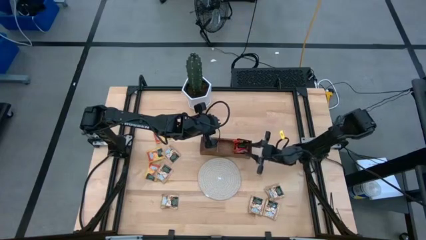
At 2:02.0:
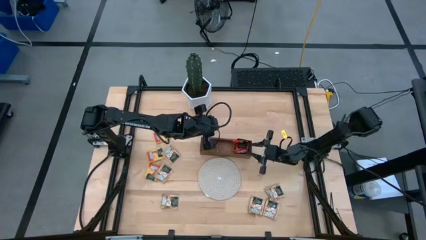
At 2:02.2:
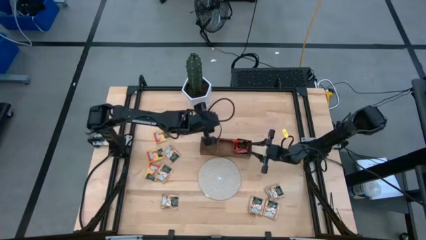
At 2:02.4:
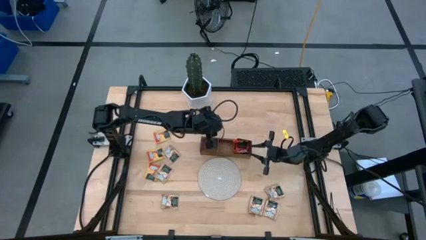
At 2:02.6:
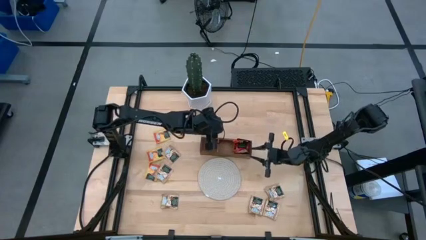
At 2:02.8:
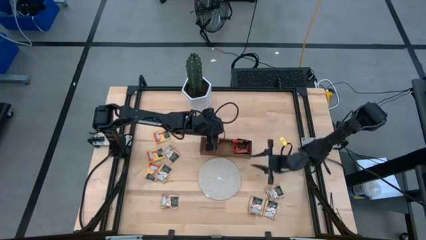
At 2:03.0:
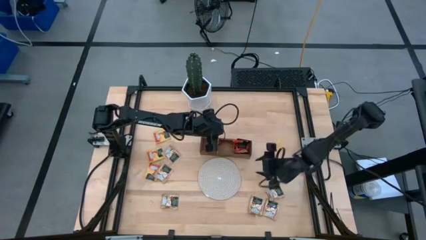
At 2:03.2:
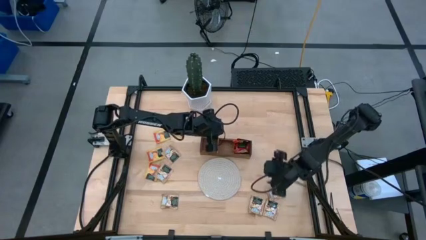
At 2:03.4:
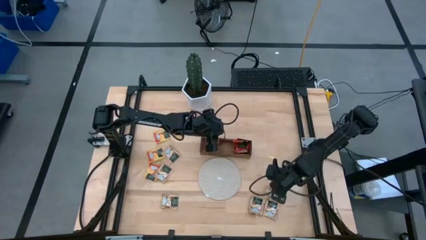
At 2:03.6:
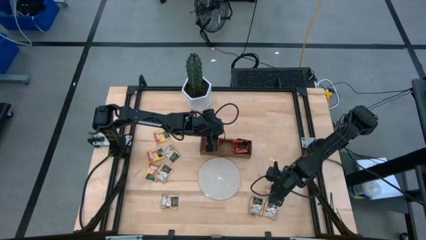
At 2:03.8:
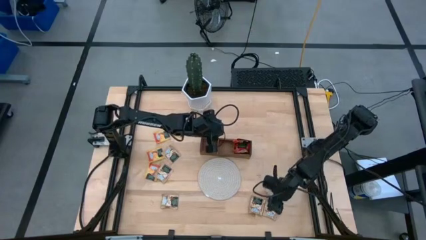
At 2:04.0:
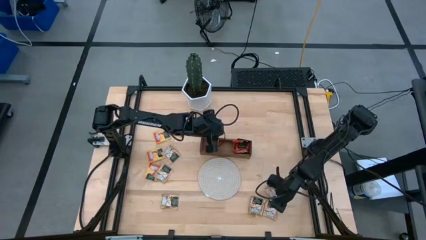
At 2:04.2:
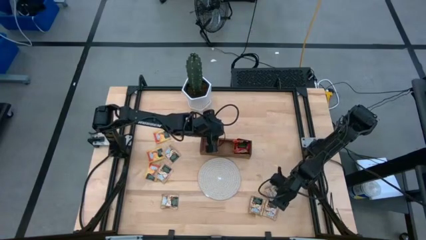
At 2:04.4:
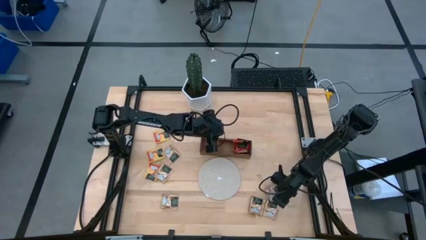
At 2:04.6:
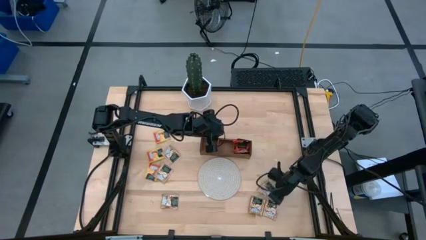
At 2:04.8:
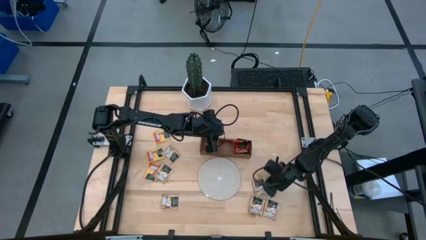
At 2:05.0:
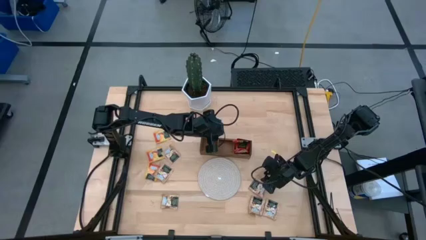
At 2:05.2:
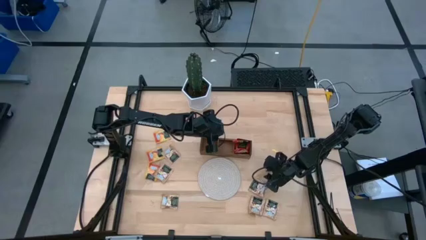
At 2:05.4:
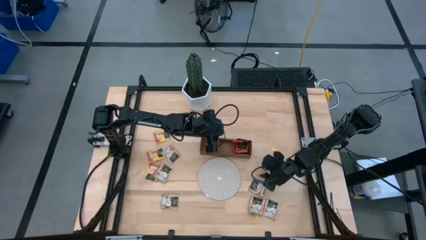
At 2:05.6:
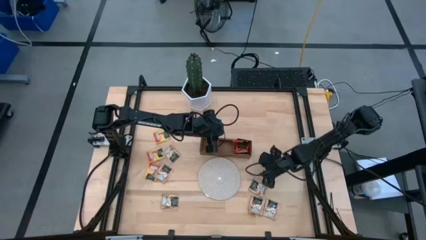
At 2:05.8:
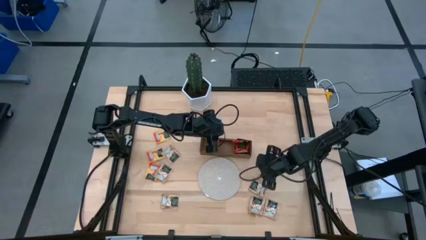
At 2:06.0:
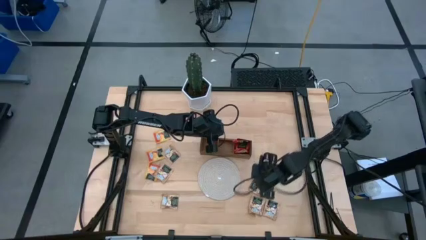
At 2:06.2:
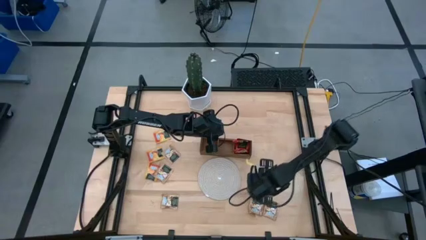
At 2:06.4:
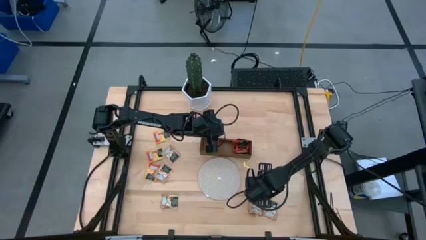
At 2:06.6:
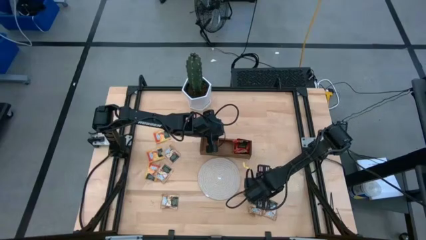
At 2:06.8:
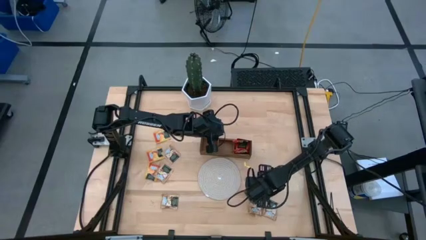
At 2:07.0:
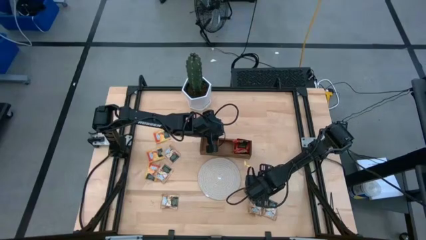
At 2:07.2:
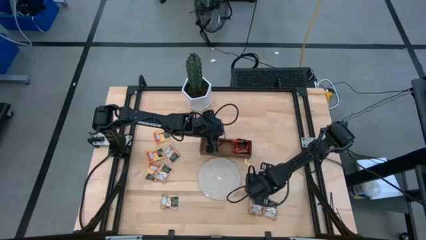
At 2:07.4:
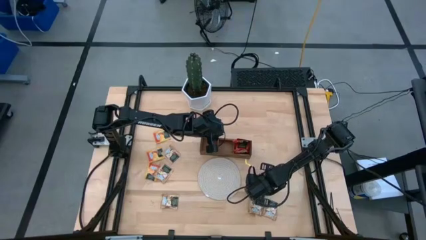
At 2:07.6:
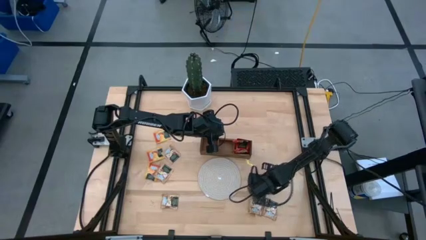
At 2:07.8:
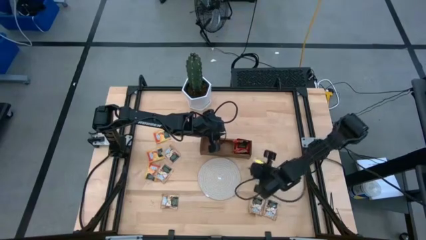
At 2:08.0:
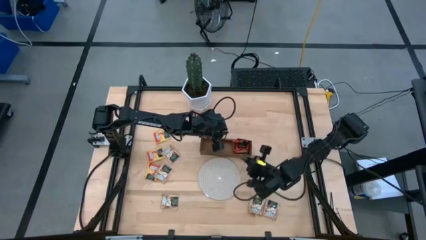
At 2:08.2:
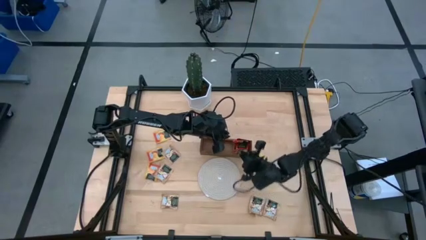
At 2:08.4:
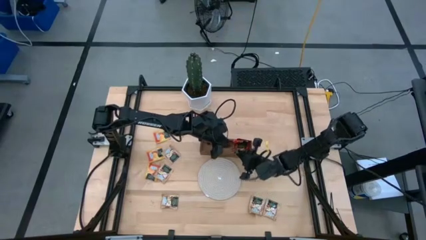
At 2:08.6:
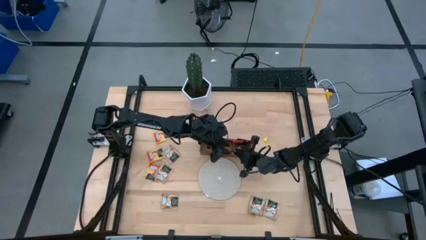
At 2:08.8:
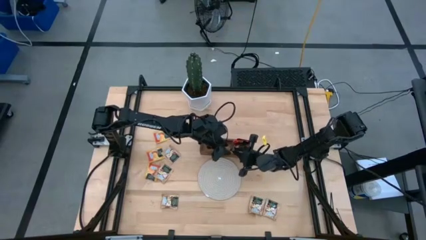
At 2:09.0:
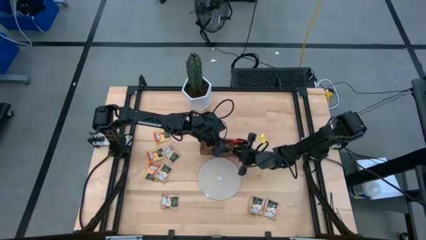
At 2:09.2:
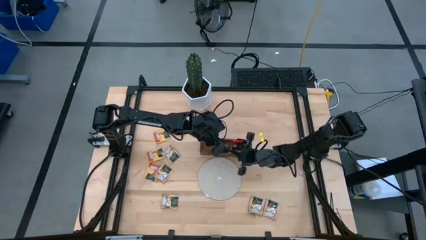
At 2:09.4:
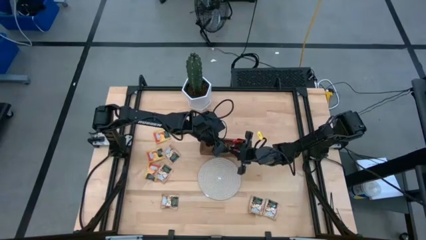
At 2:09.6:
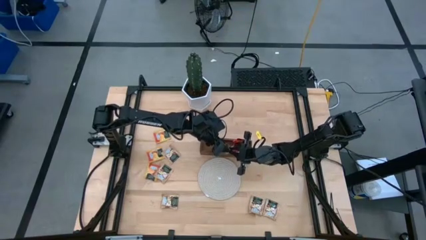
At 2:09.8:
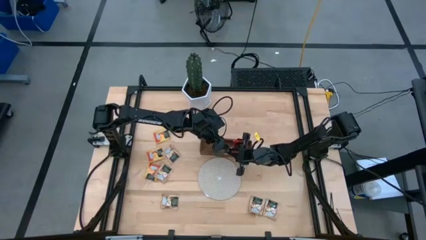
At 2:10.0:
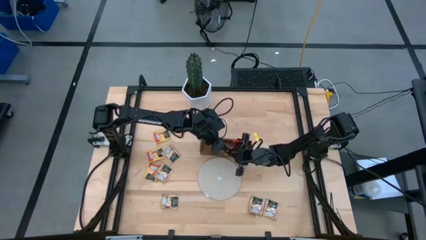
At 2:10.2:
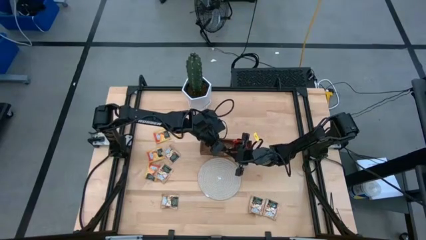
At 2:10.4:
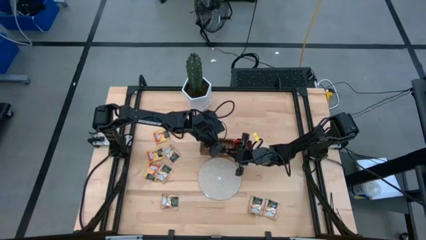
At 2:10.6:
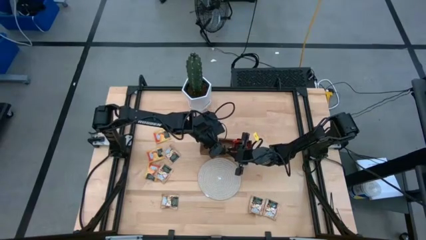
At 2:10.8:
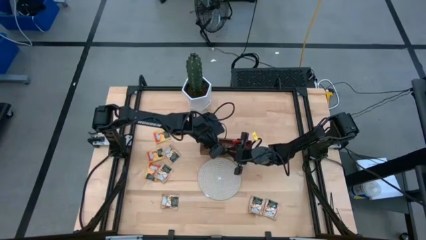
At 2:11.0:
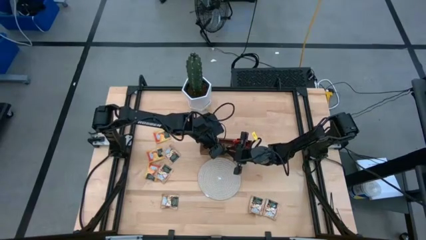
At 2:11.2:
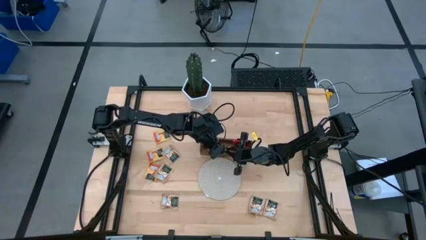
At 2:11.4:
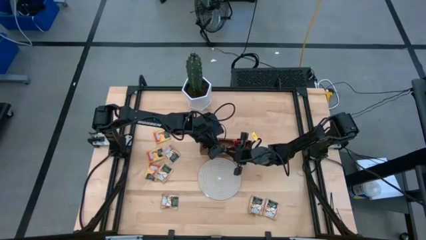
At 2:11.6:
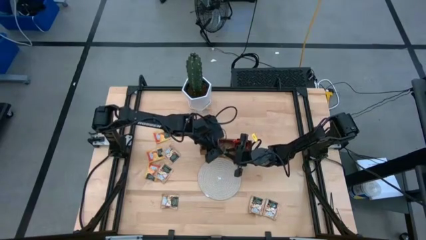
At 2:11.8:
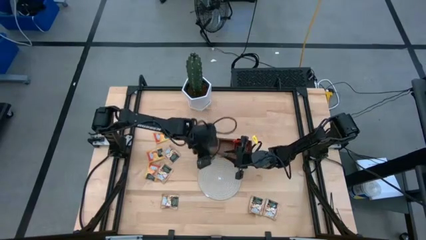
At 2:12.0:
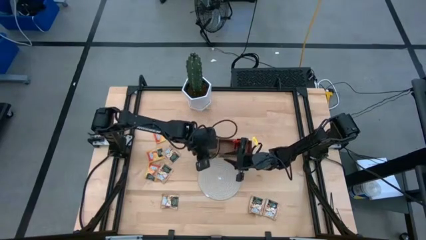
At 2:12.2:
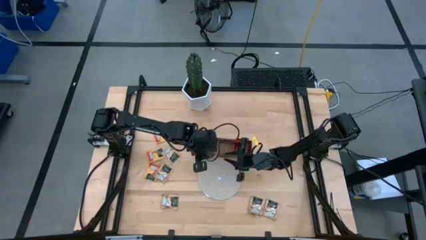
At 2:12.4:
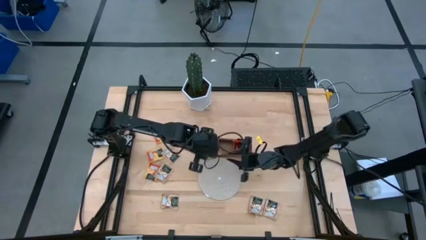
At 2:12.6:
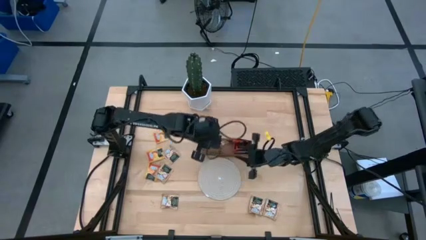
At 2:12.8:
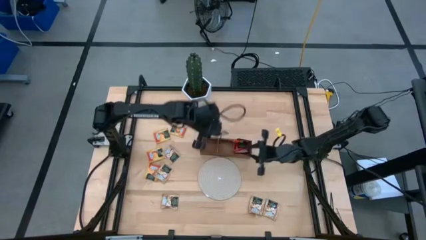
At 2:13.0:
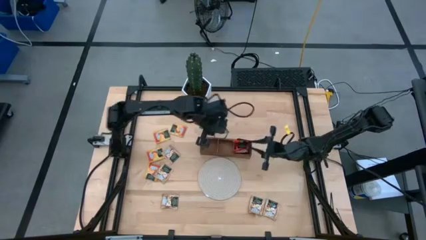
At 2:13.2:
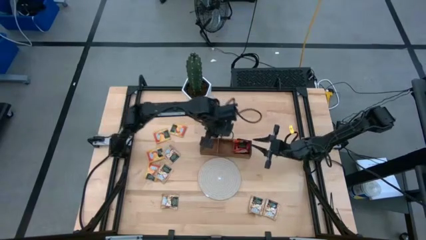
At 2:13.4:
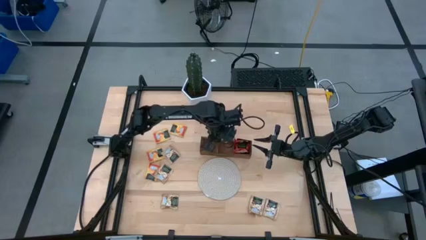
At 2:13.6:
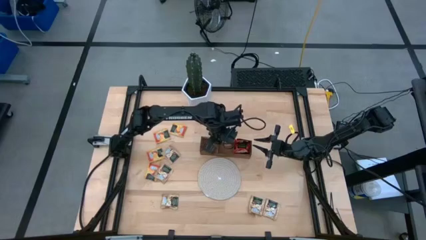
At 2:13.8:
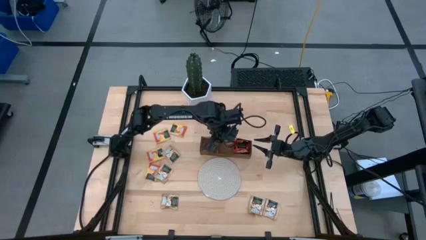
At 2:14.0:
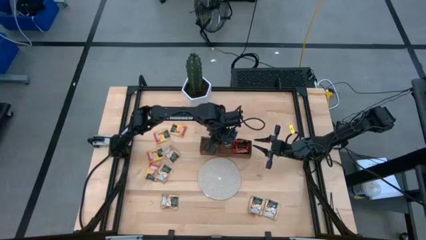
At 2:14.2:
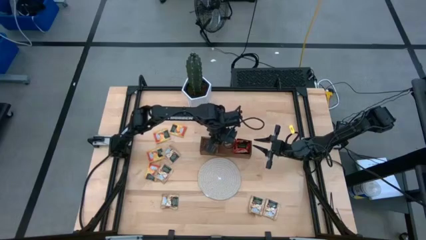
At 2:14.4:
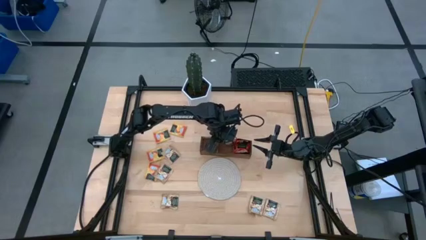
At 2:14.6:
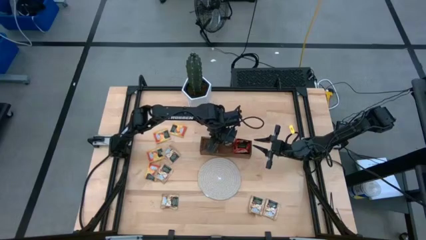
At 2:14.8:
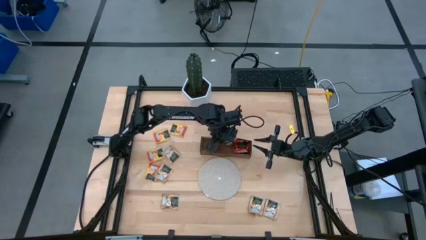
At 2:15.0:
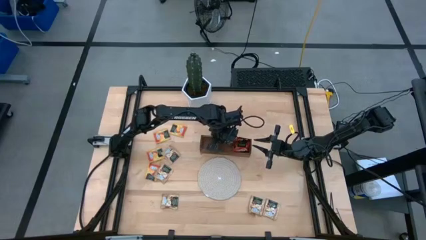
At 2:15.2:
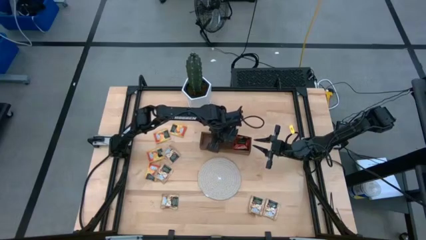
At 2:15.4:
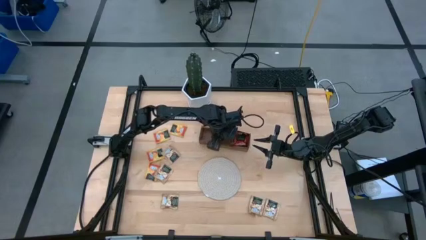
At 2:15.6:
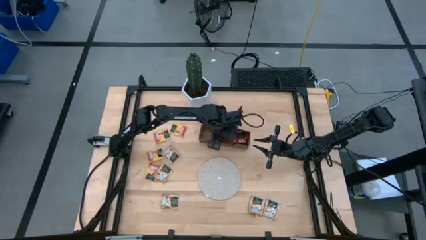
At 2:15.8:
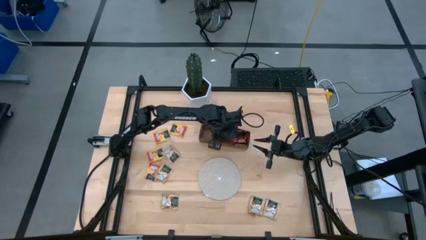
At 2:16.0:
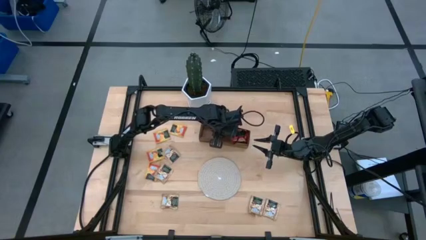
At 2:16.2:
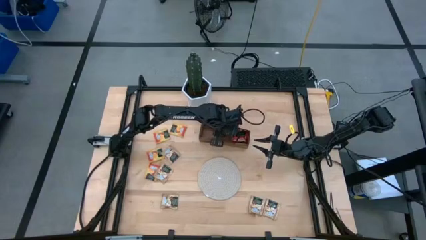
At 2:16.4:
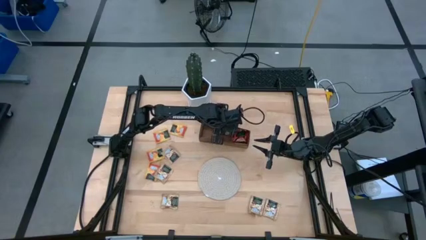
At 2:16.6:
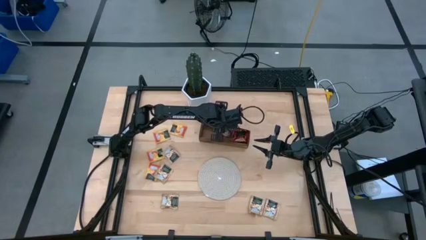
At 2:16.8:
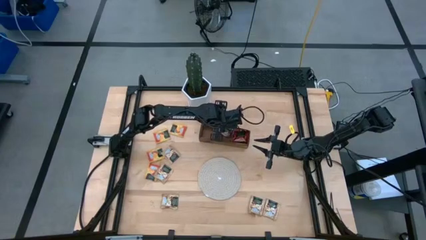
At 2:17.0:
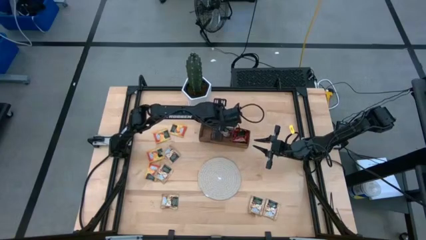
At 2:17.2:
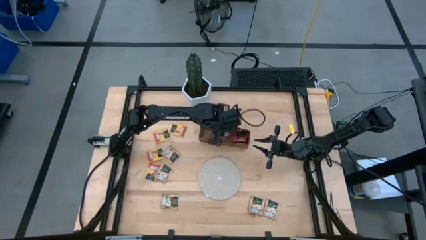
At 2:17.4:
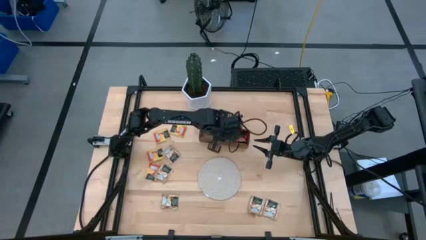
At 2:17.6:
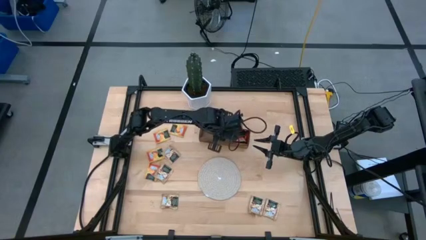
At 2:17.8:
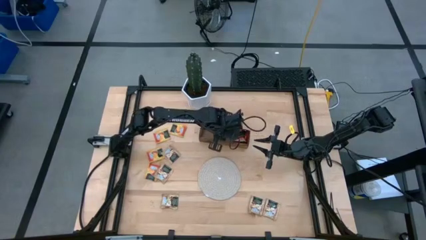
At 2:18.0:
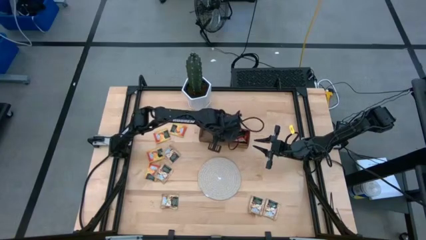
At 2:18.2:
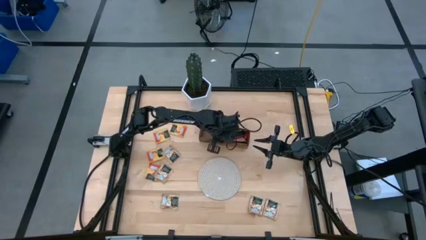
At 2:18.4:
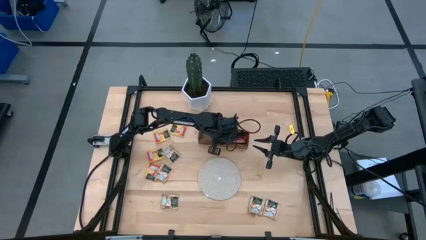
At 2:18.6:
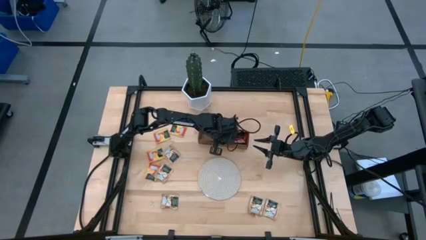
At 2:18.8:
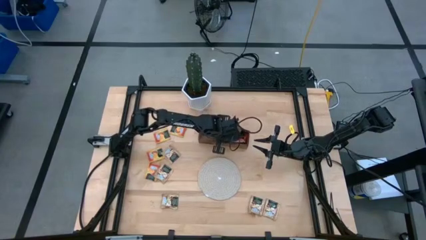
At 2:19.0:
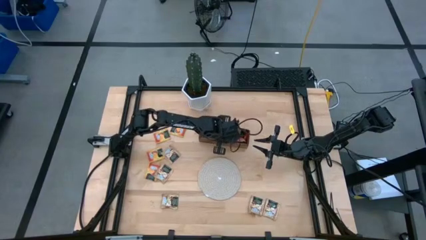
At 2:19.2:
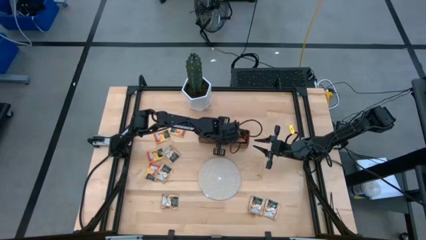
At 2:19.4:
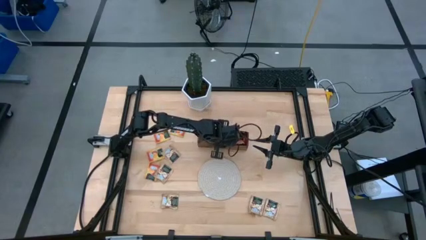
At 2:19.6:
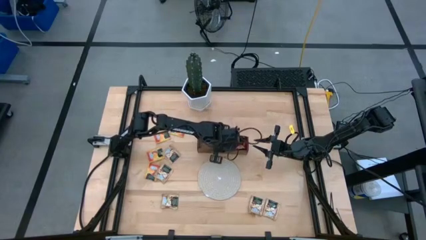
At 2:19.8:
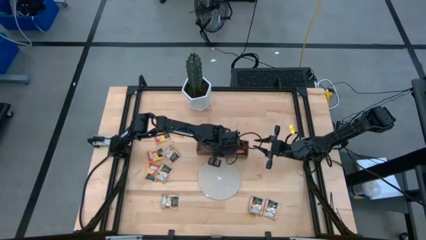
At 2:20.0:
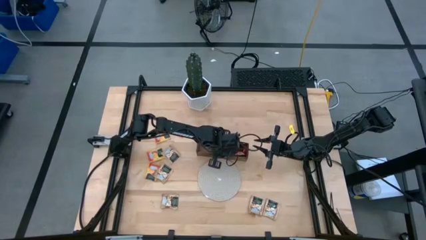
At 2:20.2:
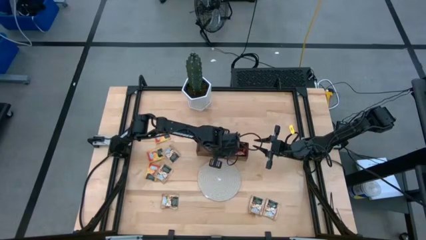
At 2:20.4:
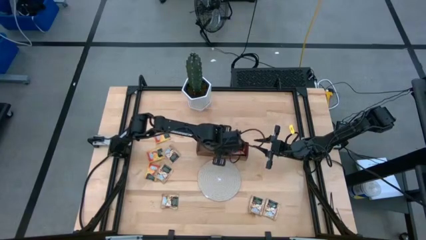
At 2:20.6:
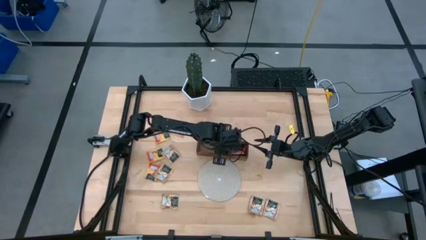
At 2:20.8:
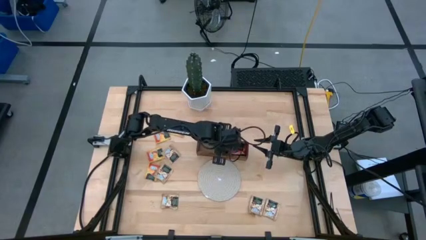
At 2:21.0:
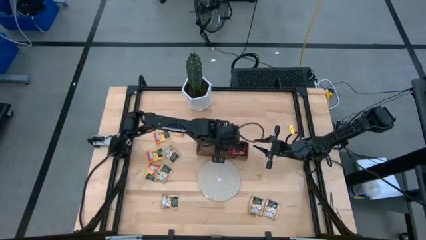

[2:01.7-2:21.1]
Task: Pick & Place Tea
Put the brown tea bag into the middle section of the wooden organizer
